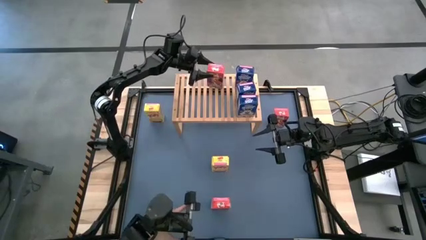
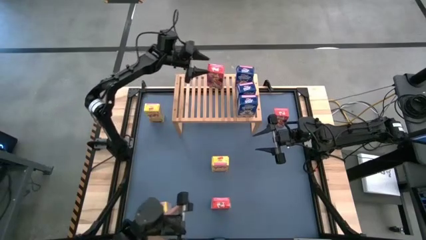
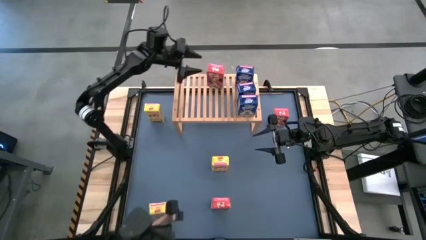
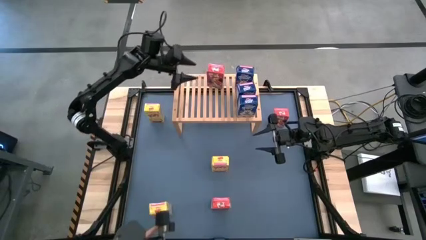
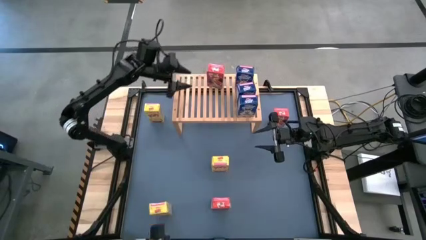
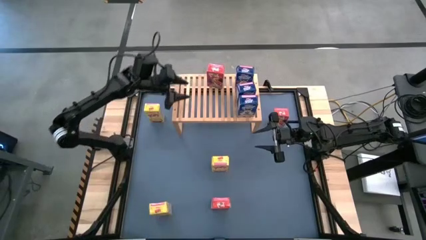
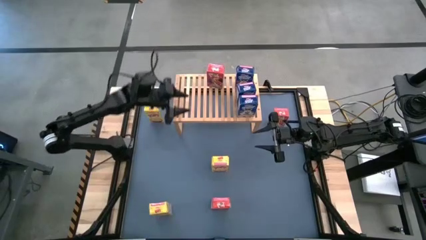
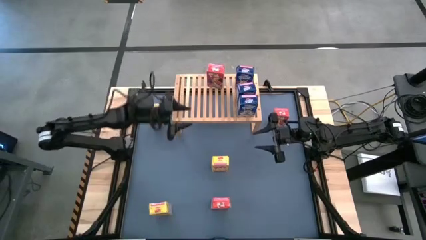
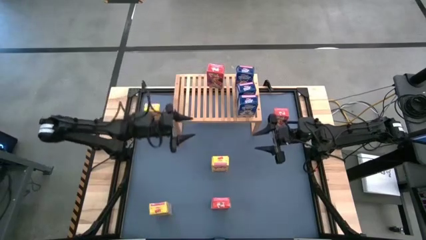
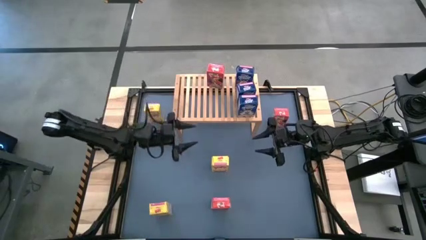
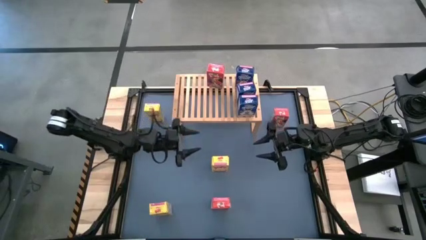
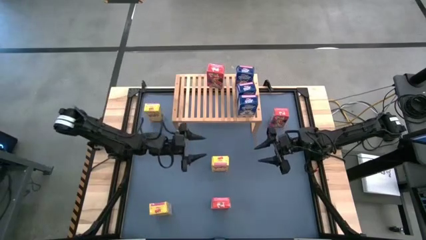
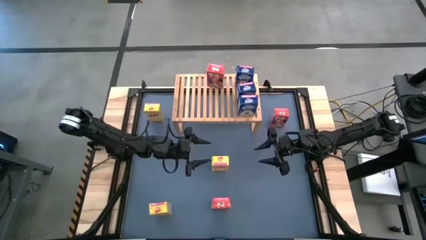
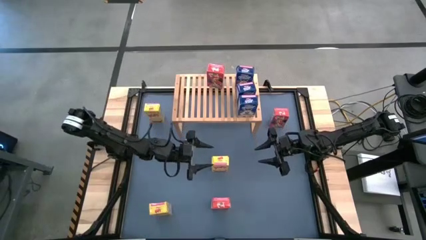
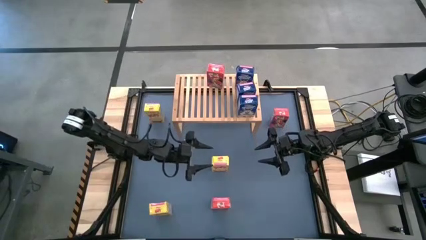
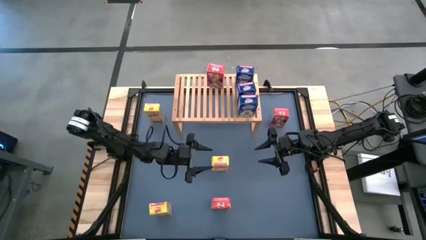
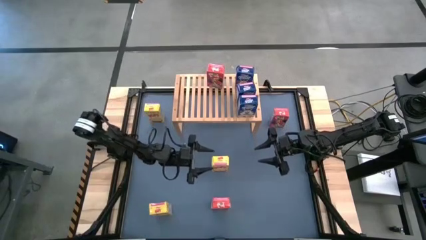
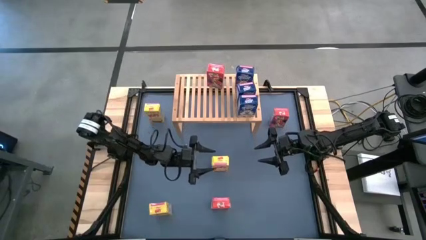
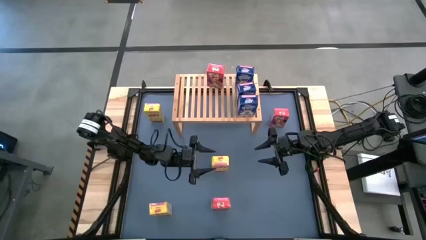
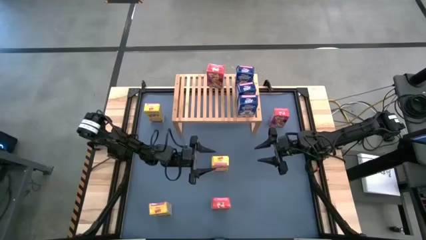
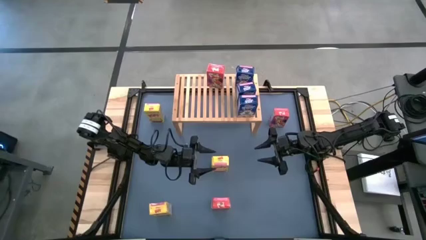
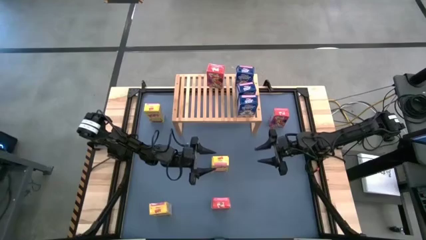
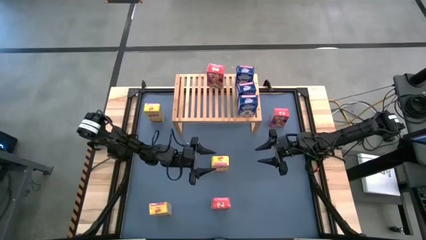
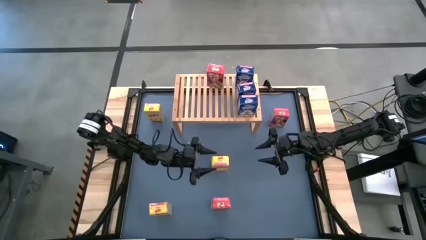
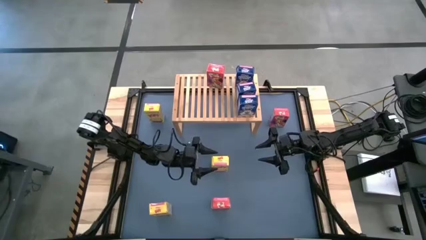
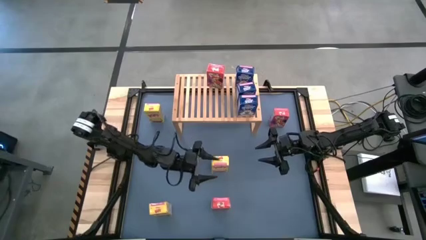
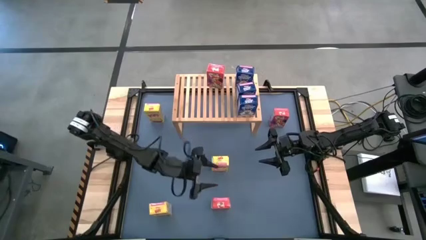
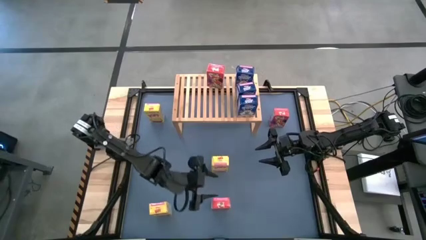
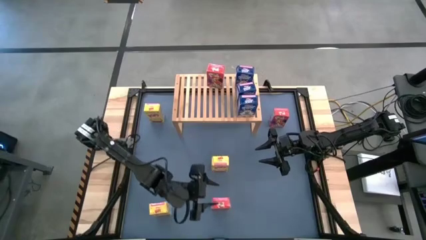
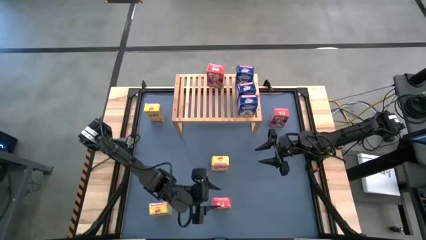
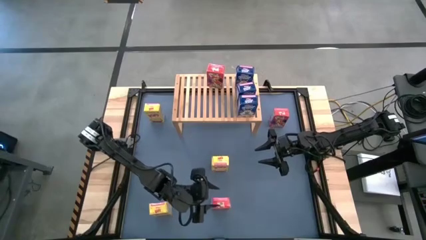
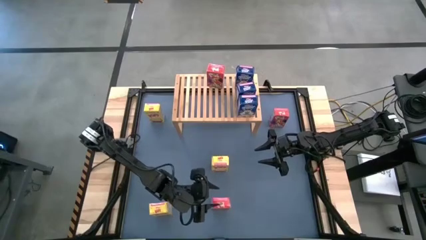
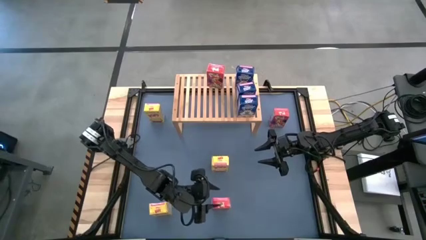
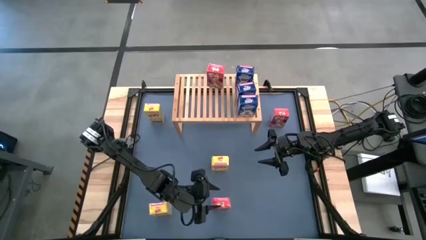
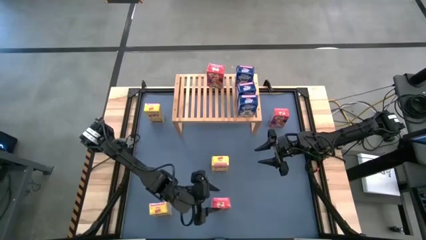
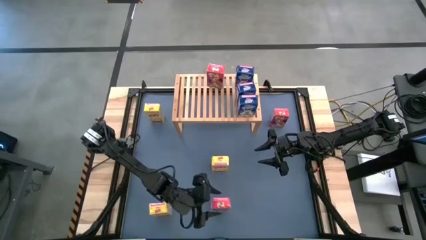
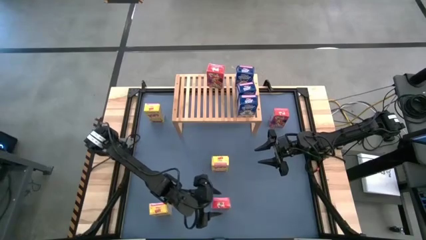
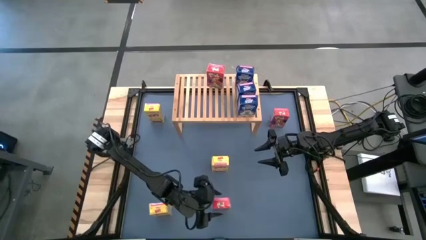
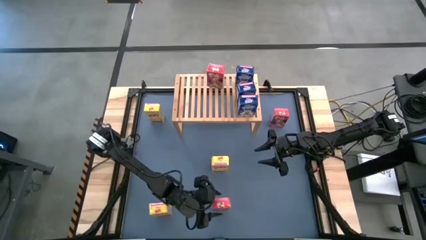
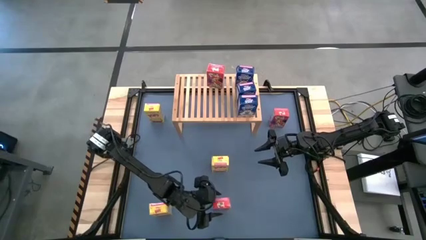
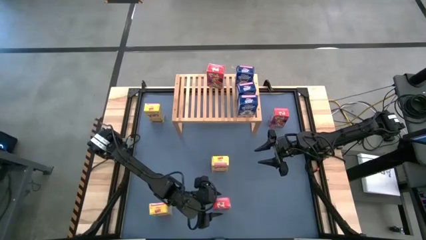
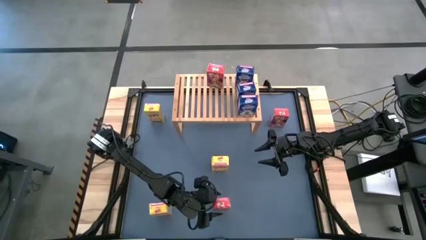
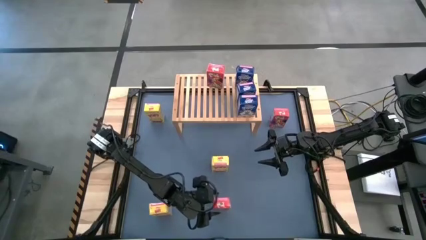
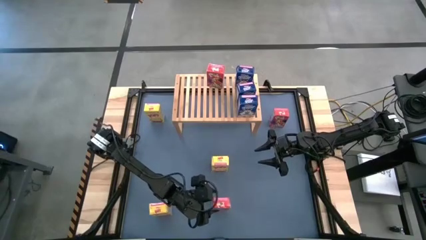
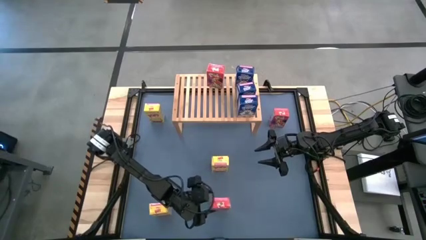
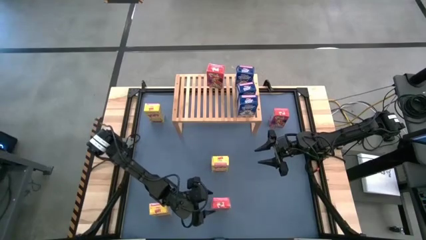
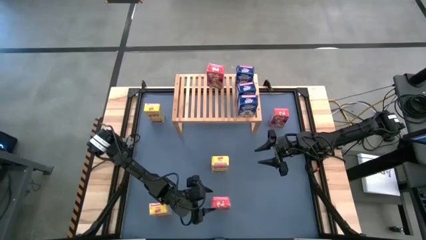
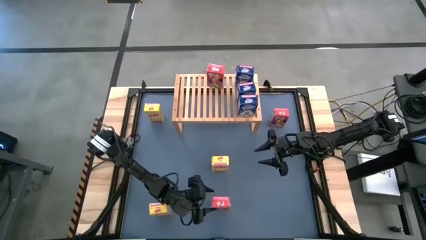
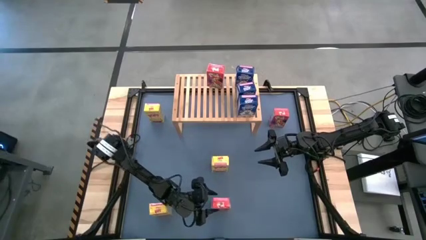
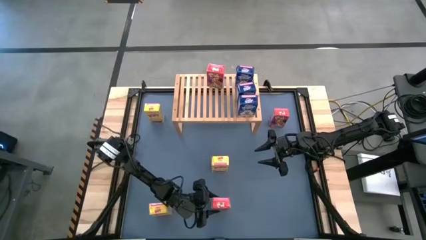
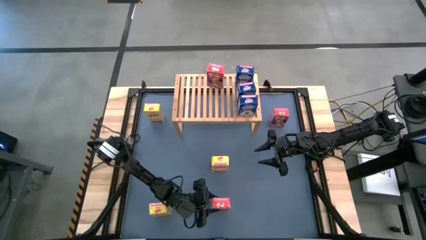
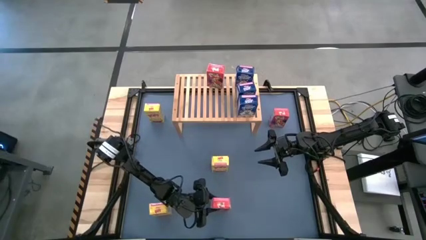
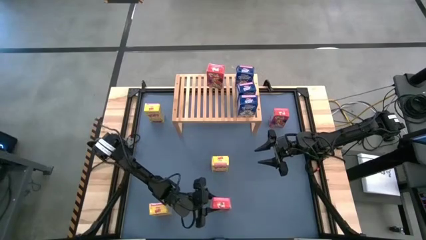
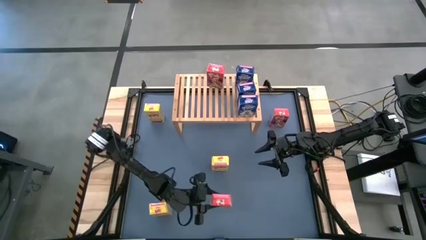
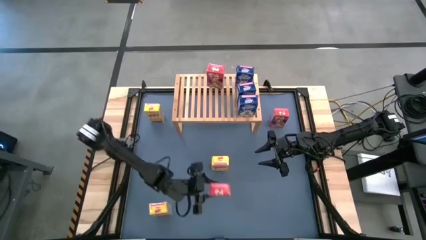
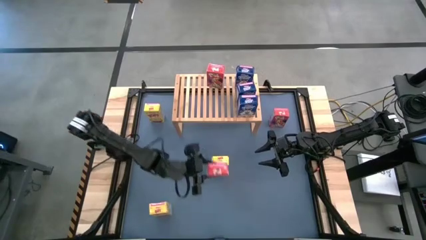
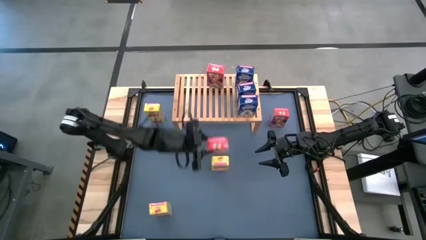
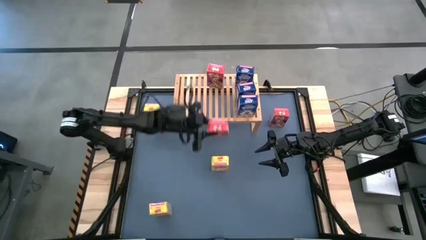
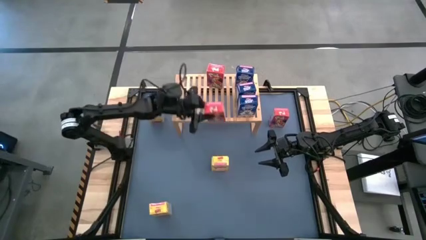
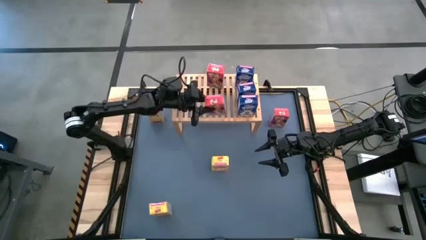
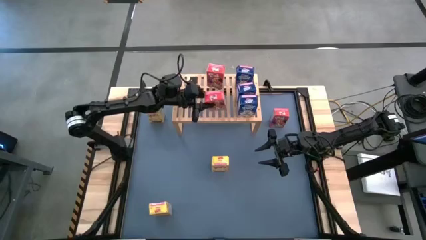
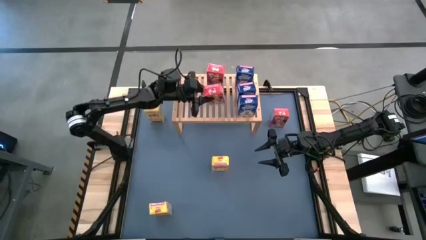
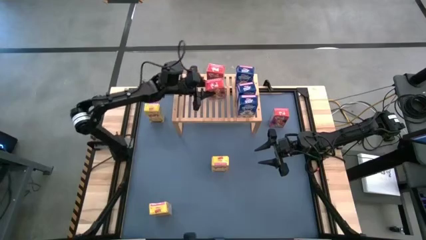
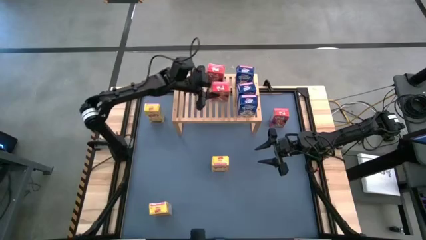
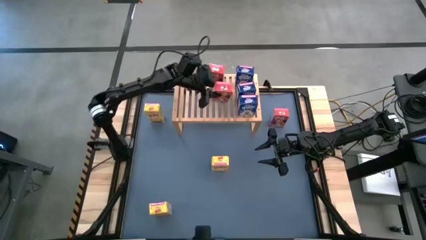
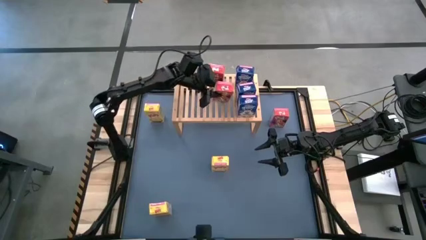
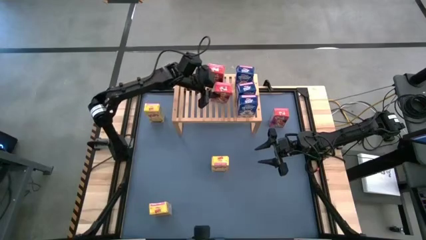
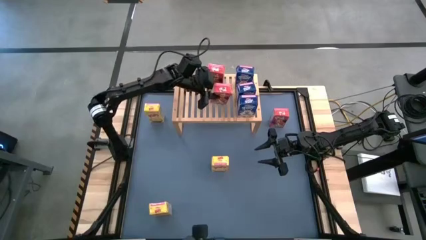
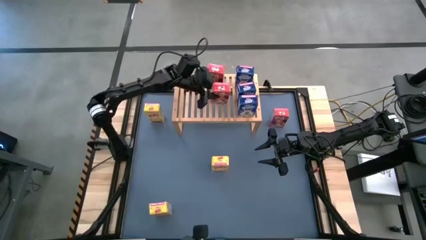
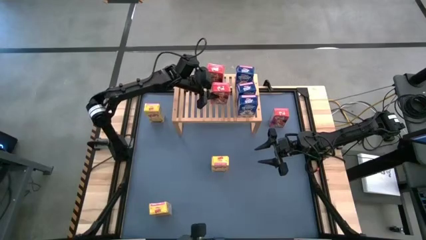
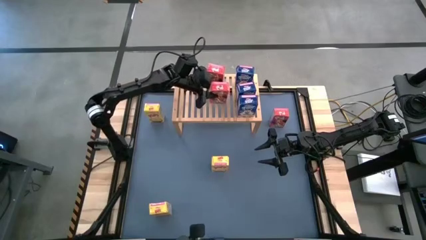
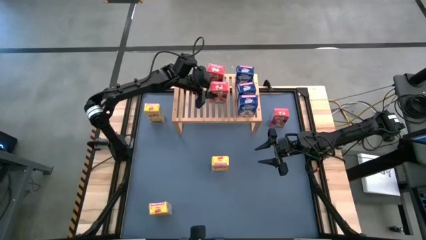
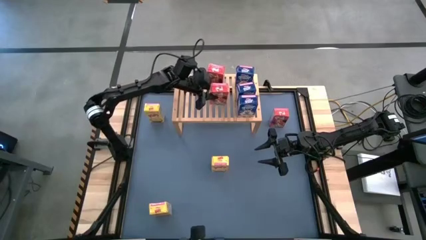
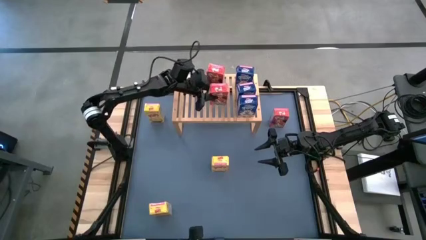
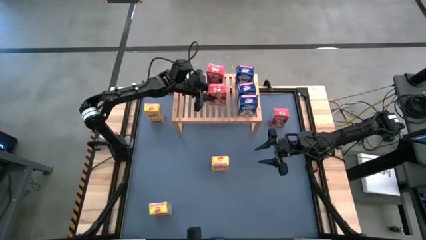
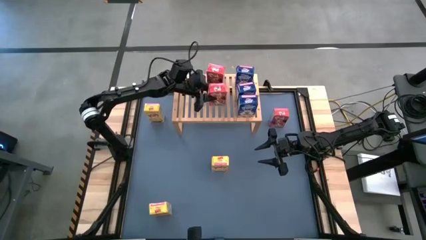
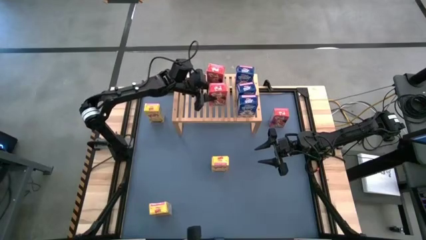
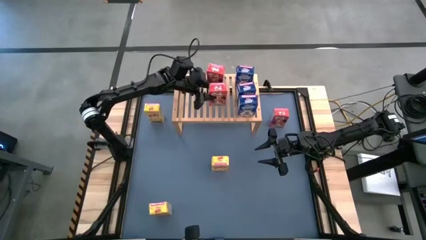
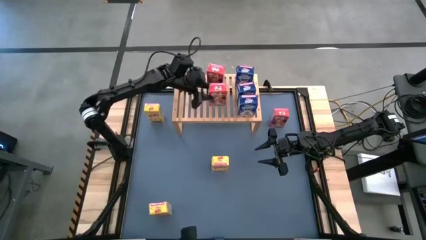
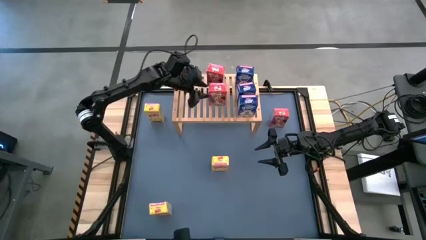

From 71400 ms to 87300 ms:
Task: Stack cereal on shelf
Put the bottom red cereal box on the shelf aligned with the other red cereal box
